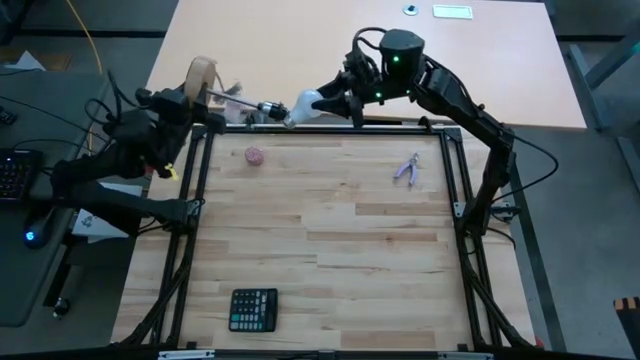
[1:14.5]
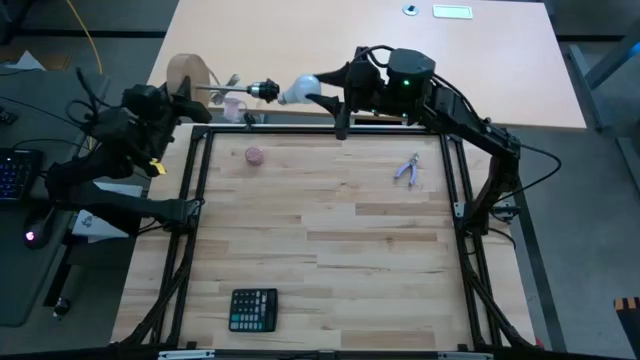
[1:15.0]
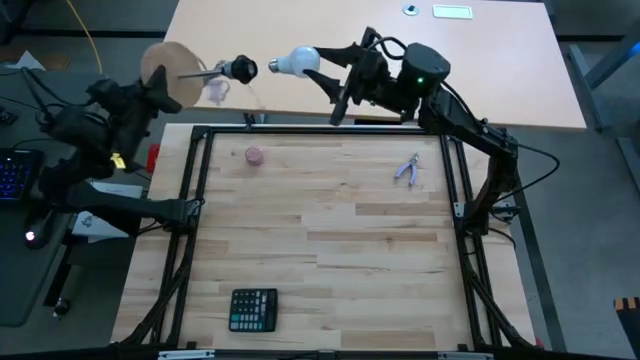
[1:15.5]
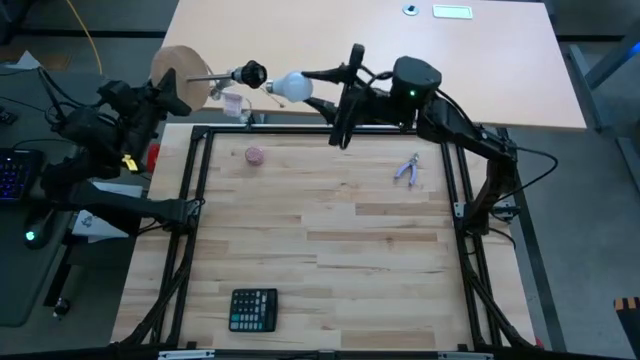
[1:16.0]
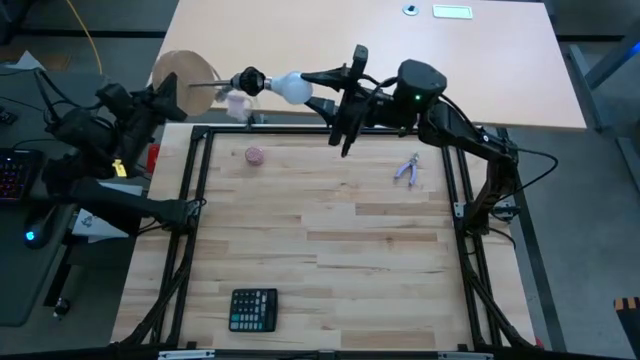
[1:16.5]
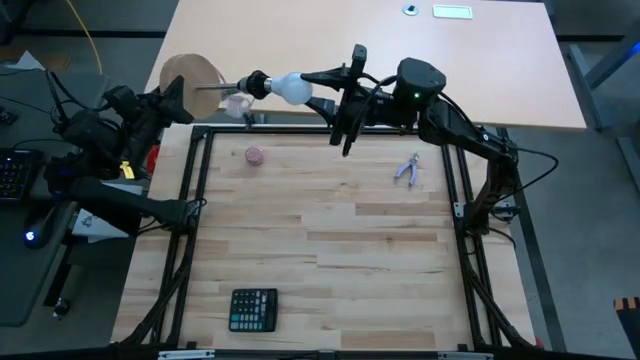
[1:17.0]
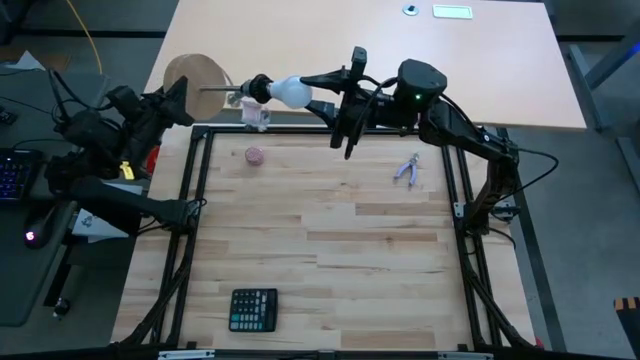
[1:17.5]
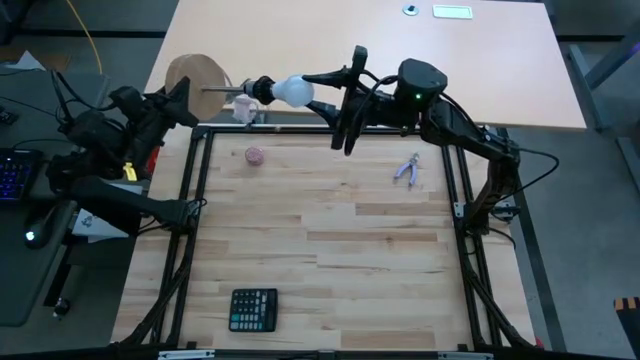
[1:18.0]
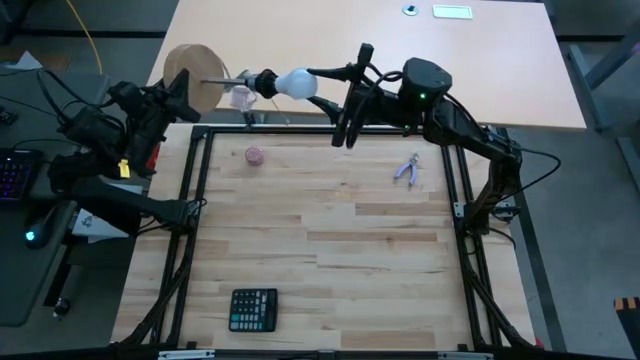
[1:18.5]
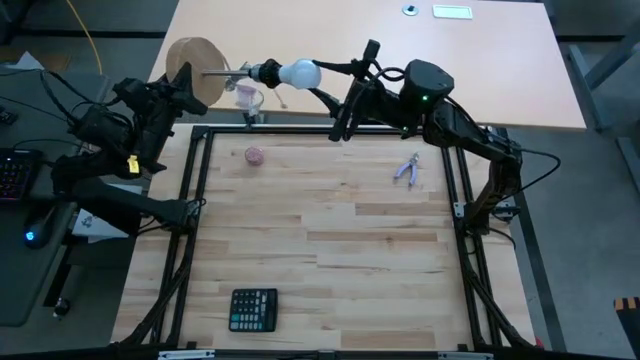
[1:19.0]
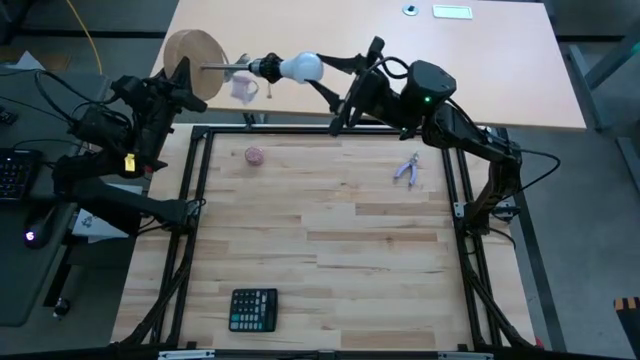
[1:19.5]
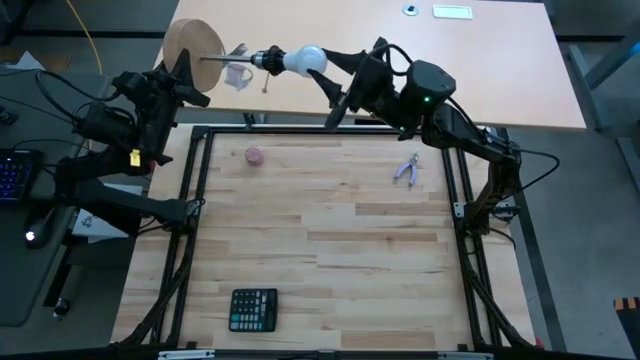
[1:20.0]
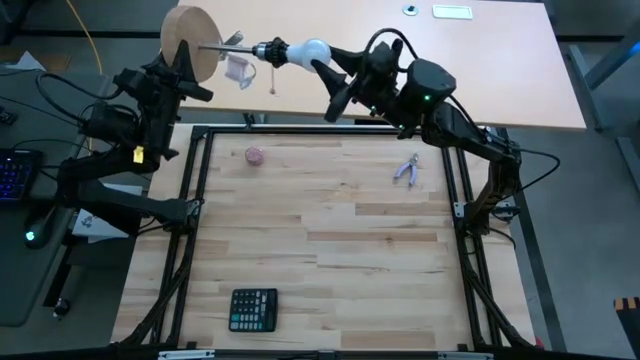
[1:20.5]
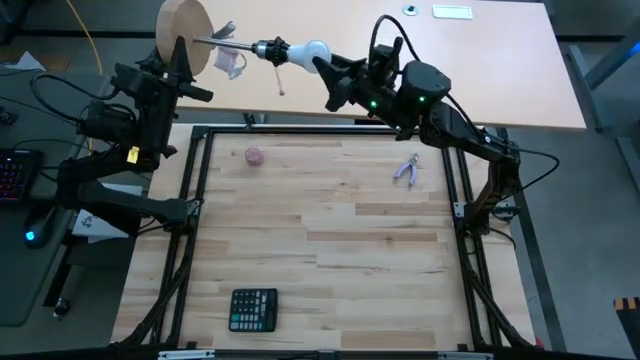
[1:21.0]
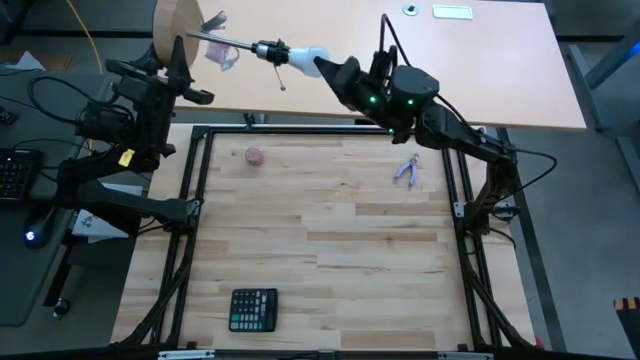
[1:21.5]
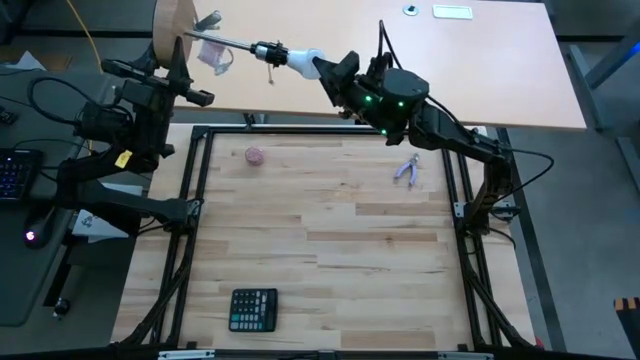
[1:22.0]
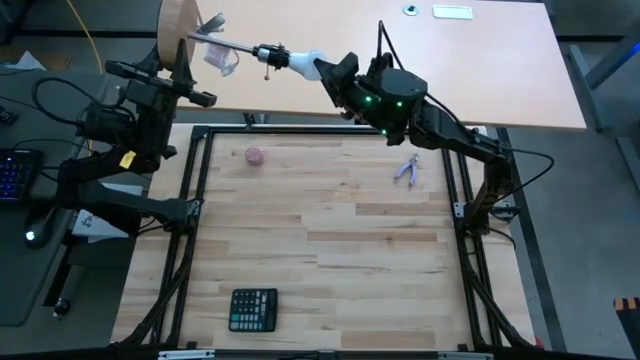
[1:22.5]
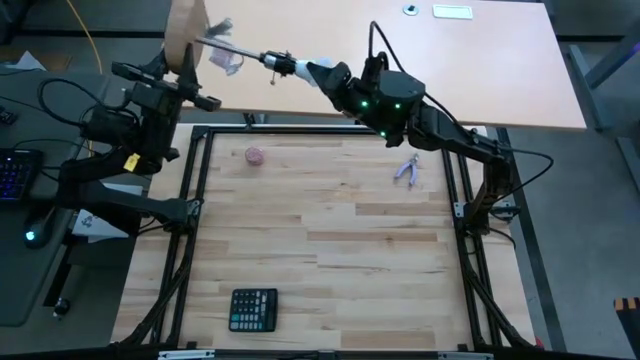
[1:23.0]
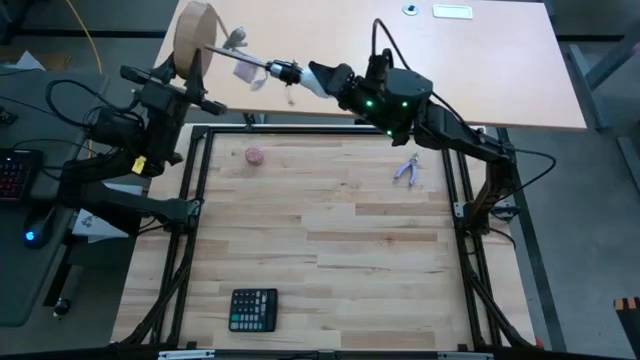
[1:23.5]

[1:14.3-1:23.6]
Task: Screw lightbulb
Insert the white lightbulb into the brown lamp

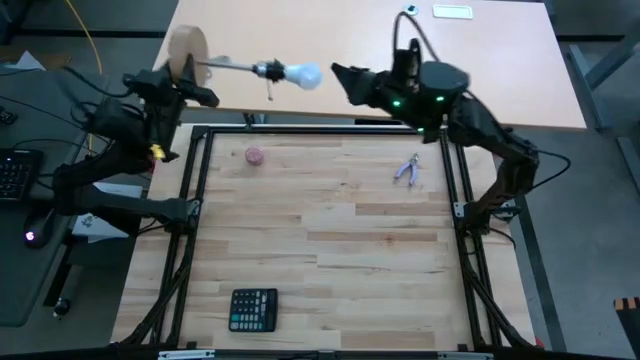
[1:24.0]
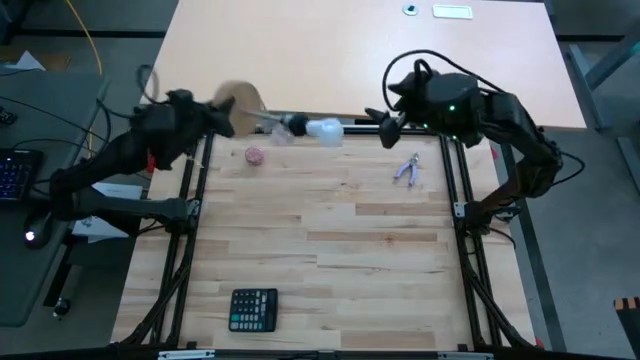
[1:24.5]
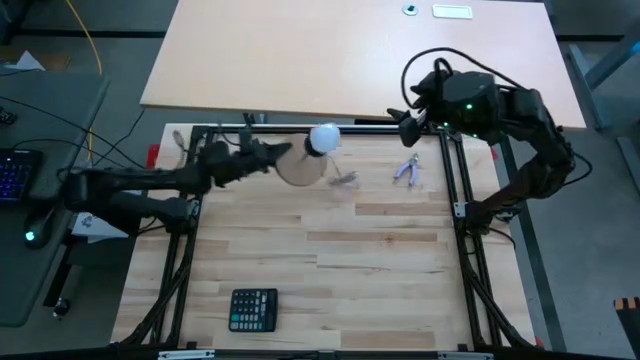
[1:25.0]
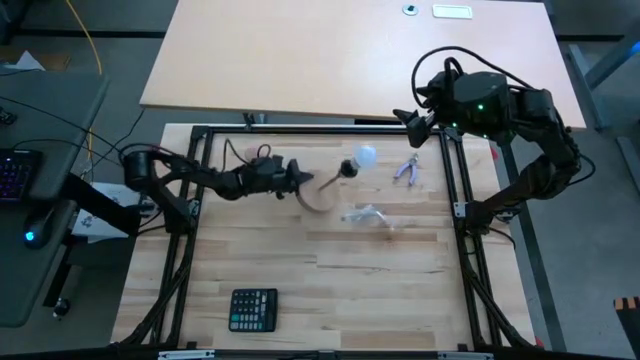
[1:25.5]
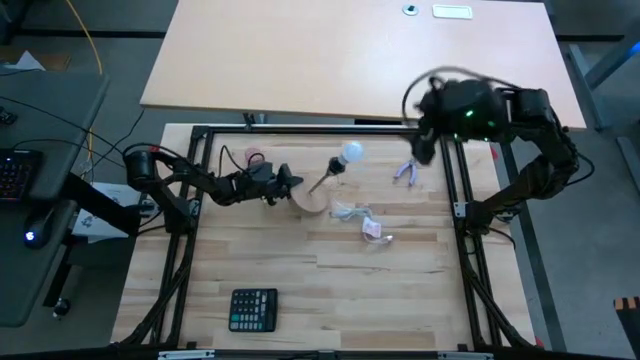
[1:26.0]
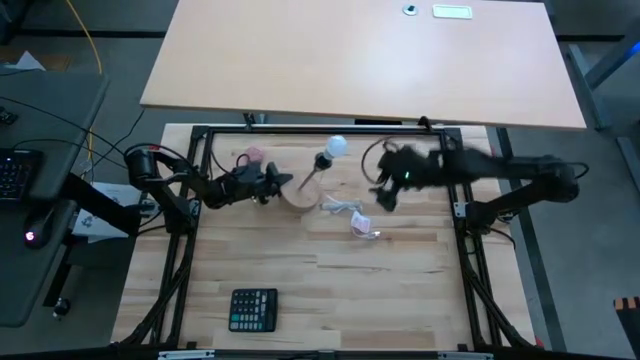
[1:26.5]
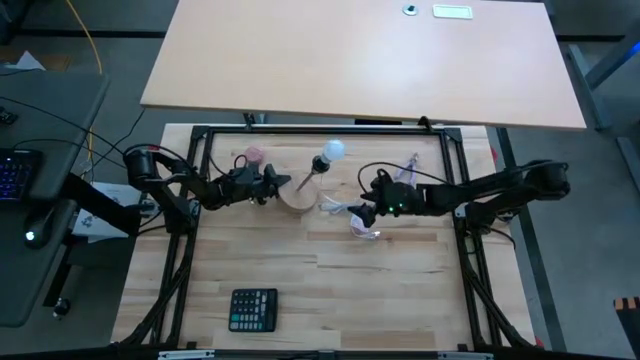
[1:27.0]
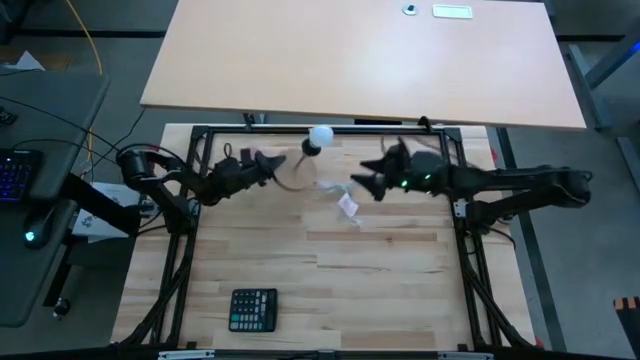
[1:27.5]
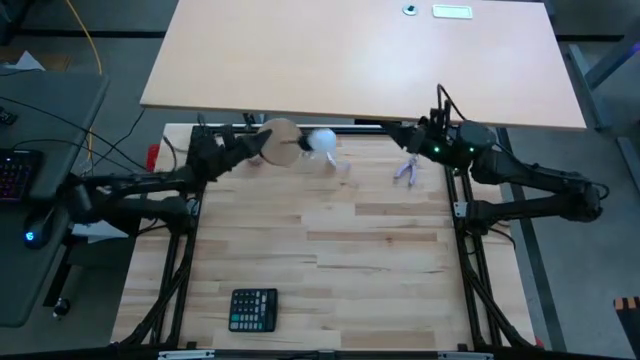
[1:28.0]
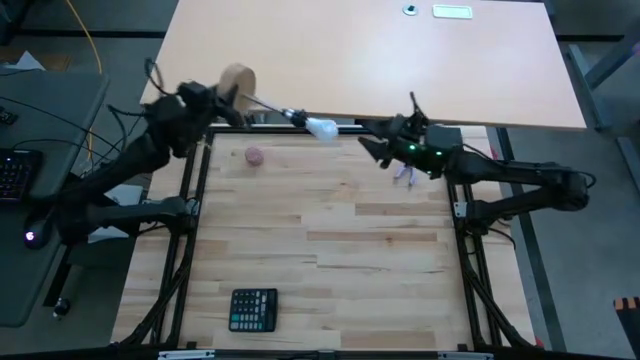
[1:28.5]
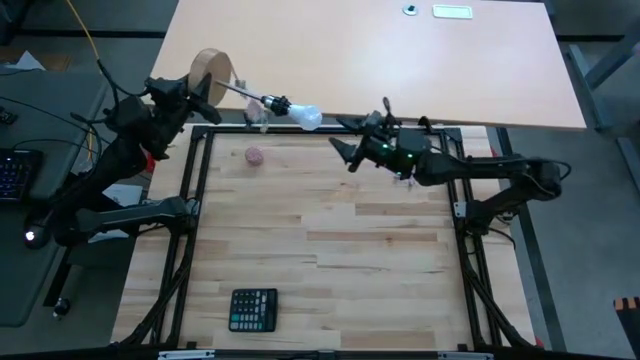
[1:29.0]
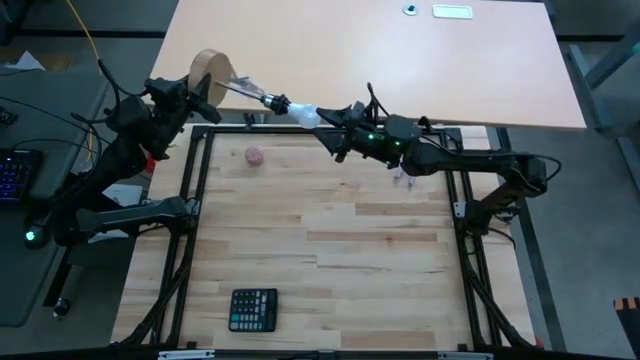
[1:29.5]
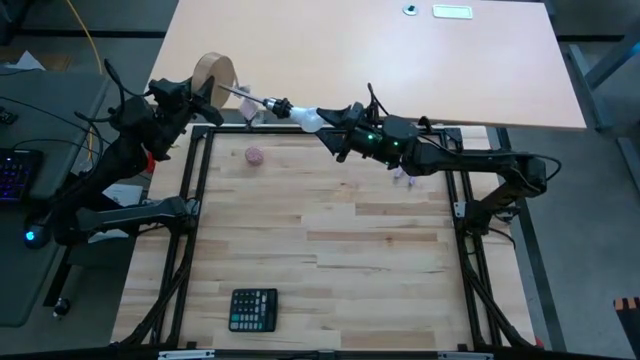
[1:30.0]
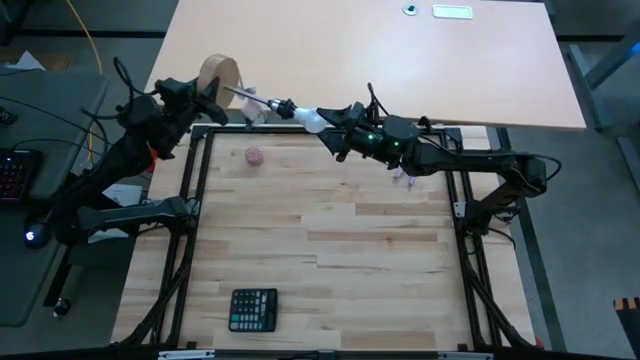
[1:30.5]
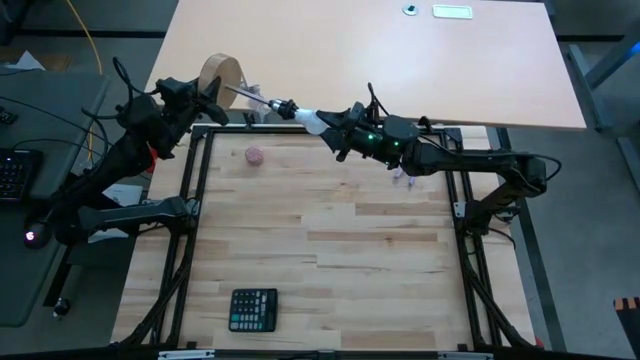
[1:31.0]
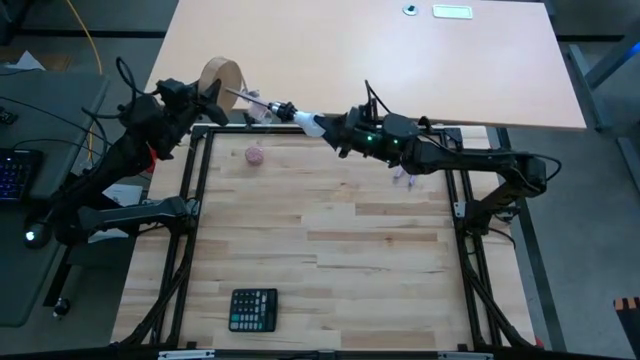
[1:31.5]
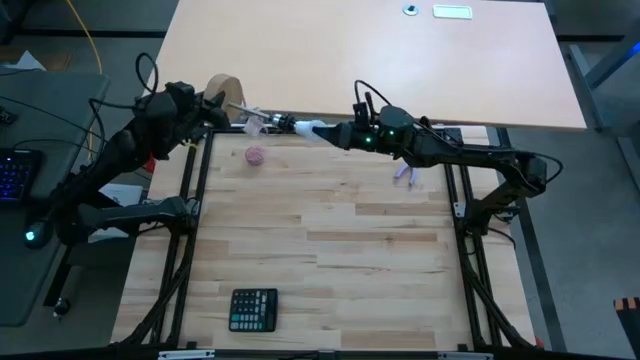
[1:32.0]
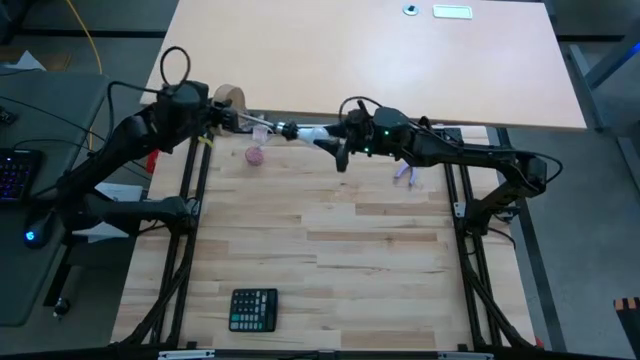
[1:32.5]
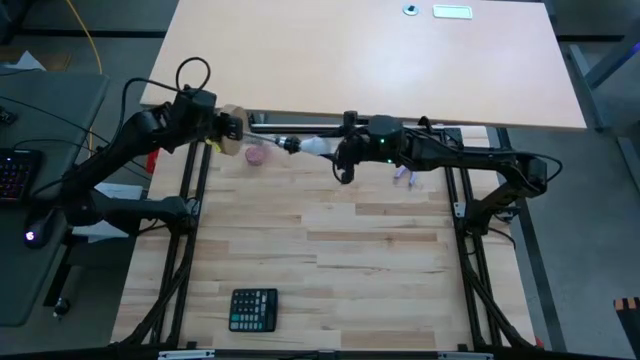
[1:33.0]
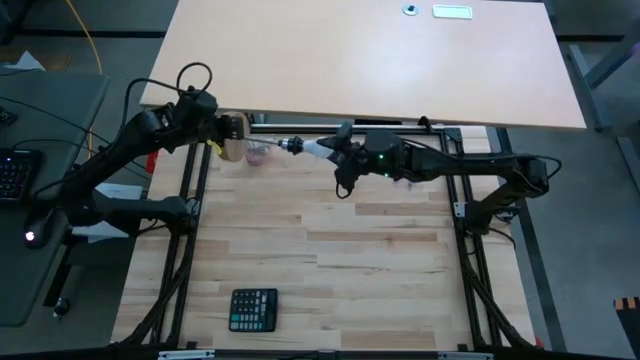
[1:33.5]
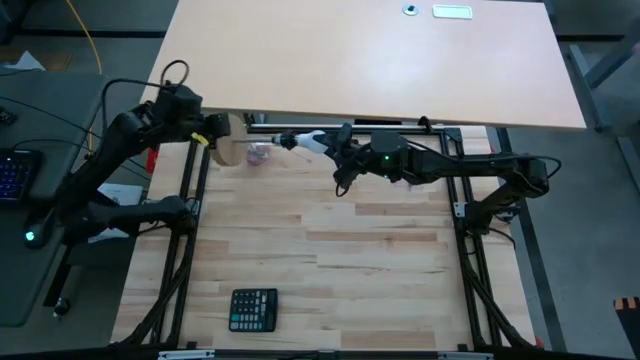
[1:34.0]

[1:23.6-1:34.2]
Remove the white lightbulb from the brown lamp

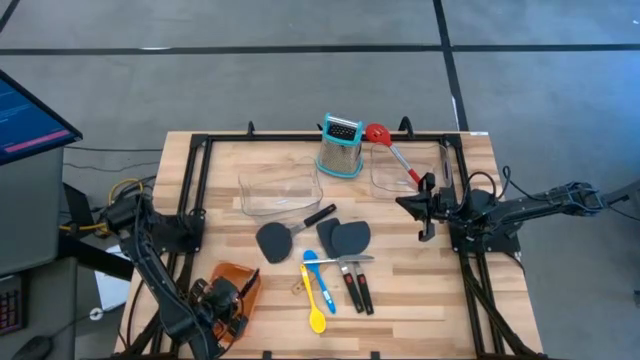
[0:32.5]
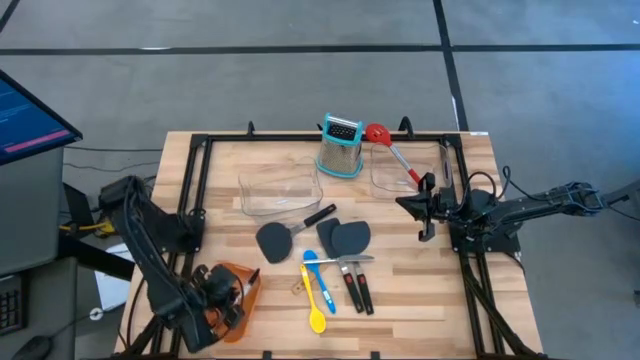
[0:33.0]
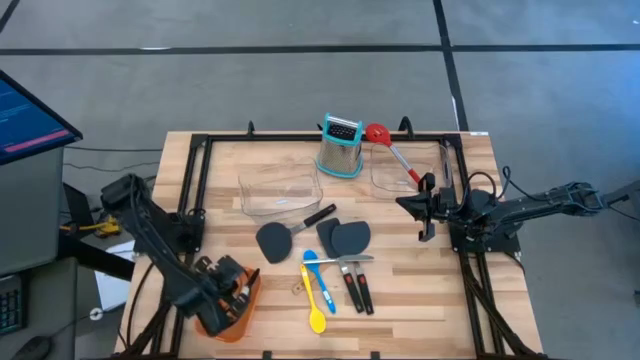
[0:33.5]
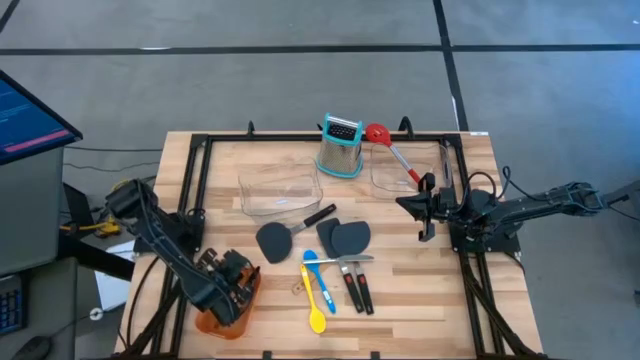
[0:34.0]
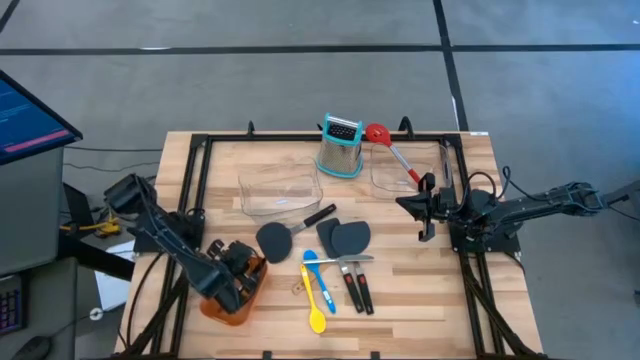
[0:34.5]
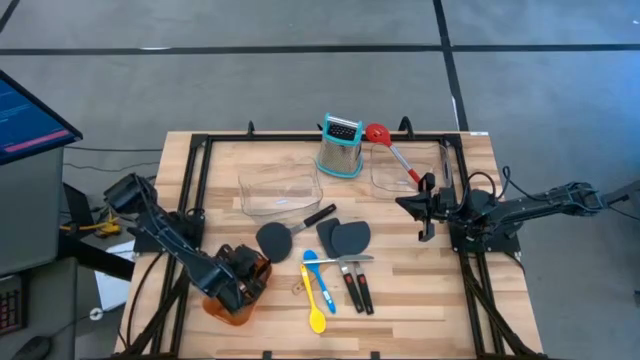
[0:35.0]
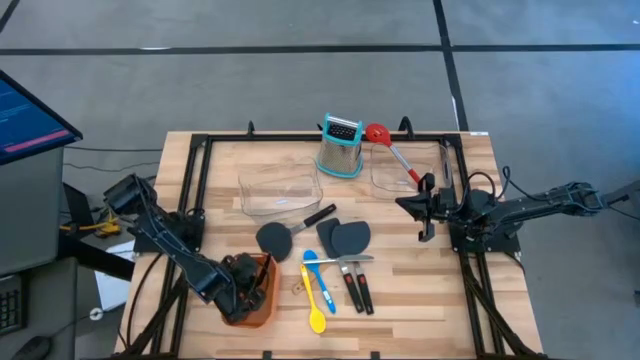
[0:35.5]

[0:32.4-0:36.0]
Task: Pick & Place Kitchen Items
Adjust the orange bin
